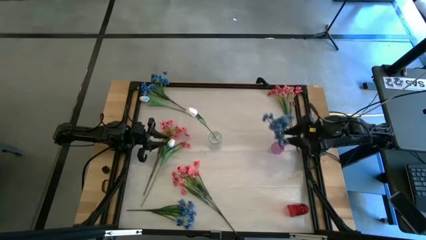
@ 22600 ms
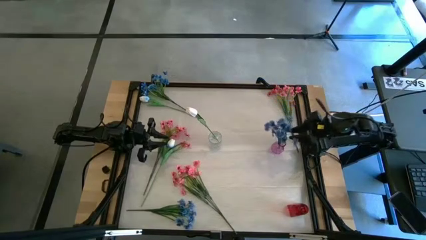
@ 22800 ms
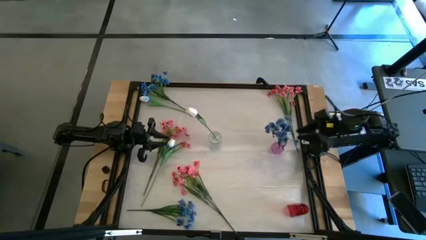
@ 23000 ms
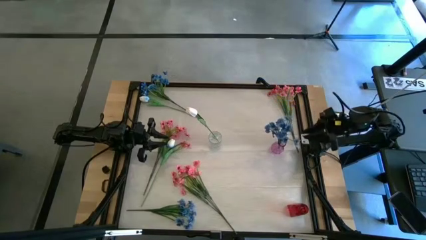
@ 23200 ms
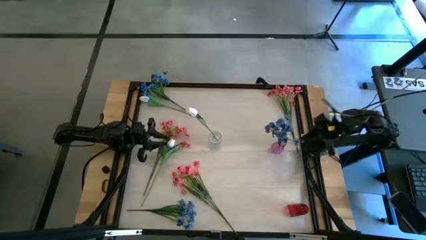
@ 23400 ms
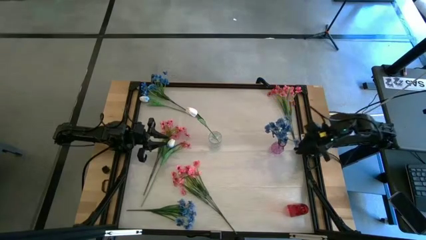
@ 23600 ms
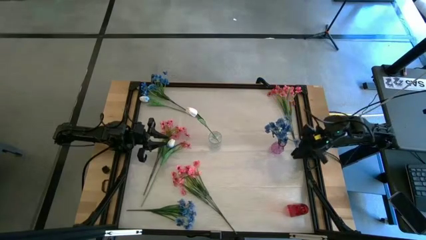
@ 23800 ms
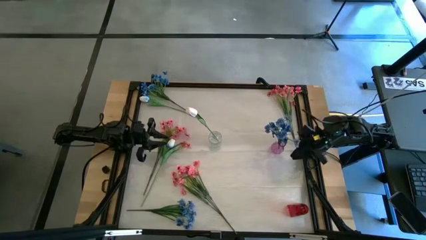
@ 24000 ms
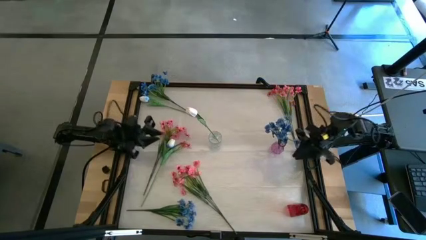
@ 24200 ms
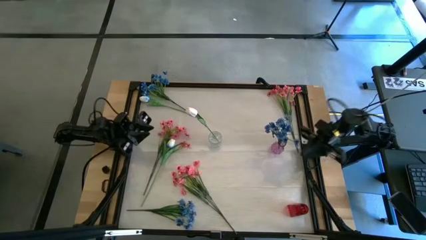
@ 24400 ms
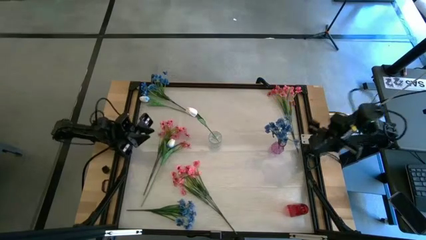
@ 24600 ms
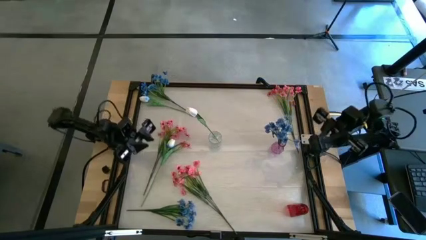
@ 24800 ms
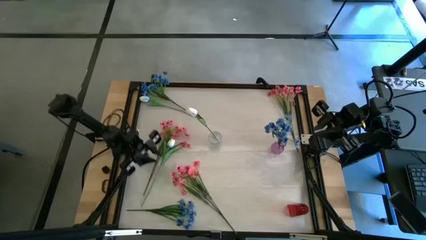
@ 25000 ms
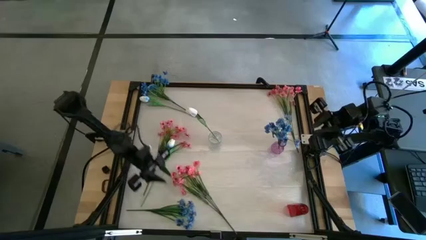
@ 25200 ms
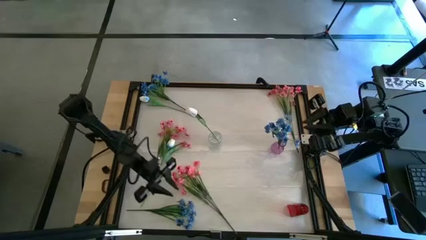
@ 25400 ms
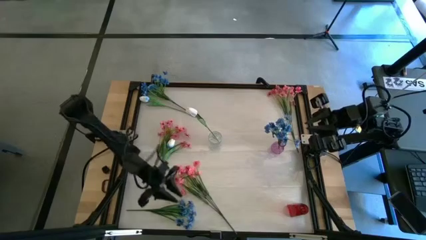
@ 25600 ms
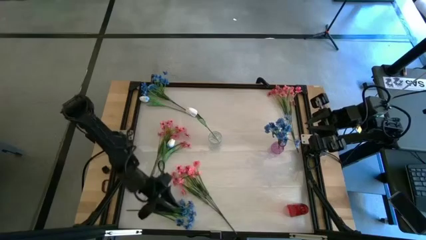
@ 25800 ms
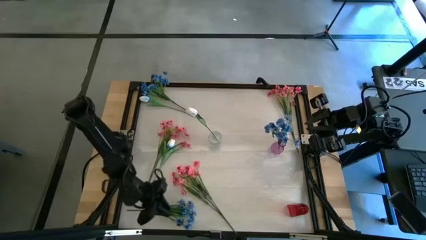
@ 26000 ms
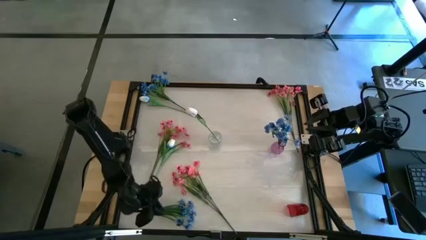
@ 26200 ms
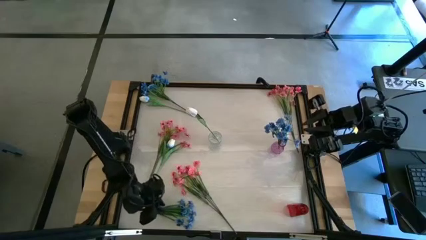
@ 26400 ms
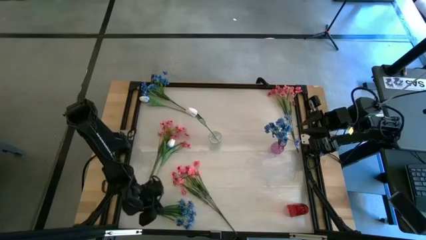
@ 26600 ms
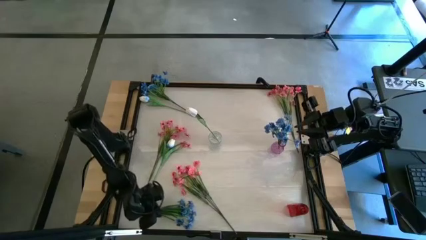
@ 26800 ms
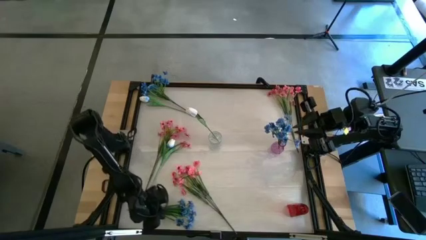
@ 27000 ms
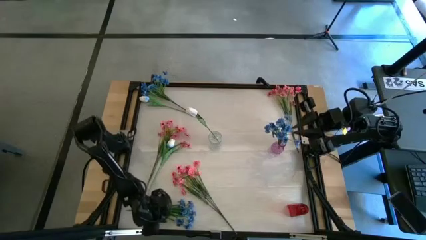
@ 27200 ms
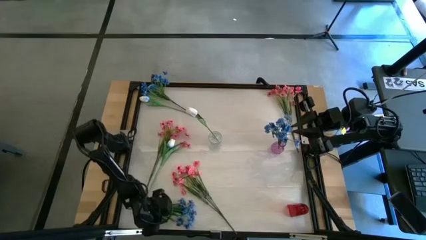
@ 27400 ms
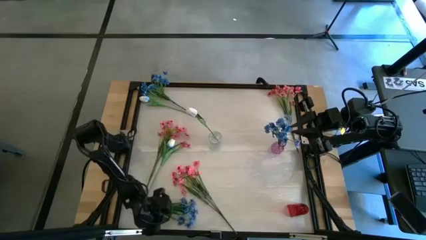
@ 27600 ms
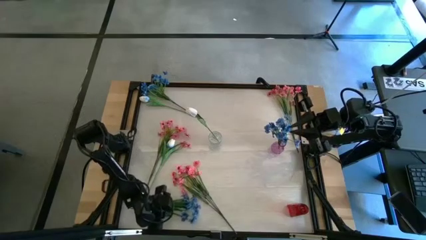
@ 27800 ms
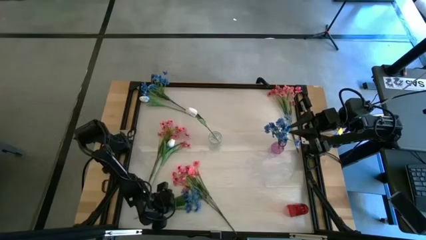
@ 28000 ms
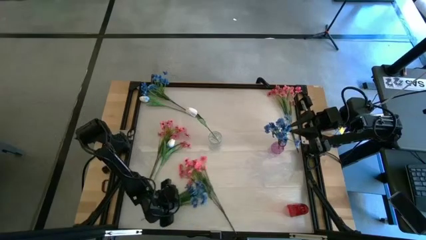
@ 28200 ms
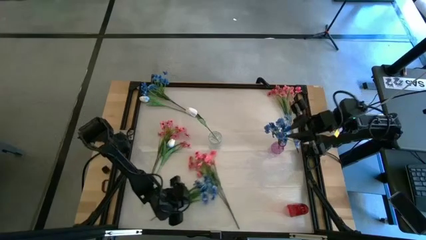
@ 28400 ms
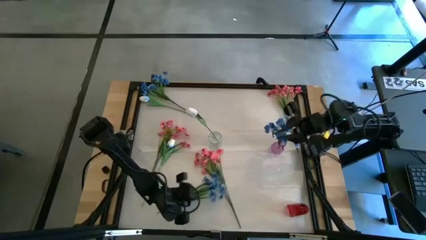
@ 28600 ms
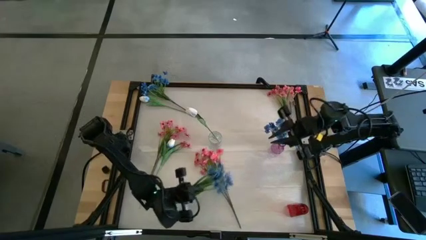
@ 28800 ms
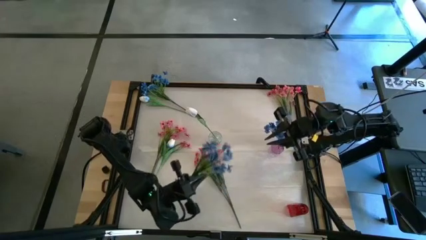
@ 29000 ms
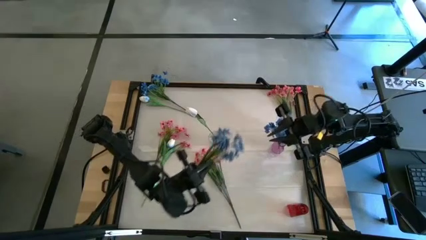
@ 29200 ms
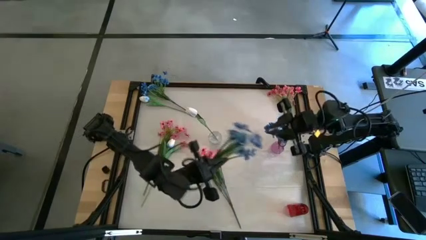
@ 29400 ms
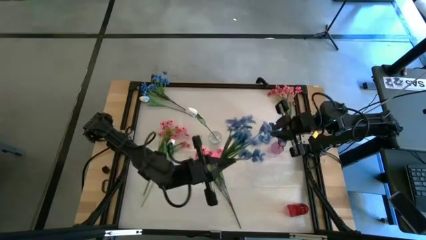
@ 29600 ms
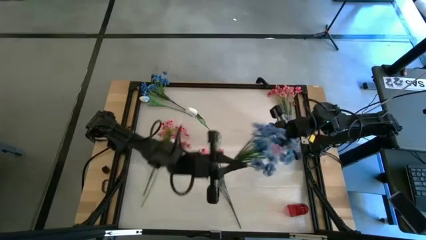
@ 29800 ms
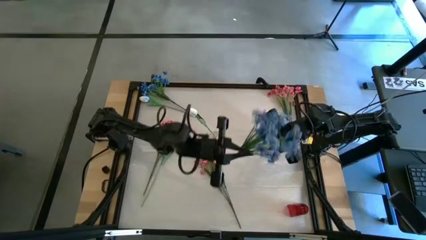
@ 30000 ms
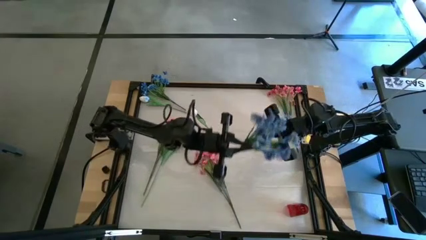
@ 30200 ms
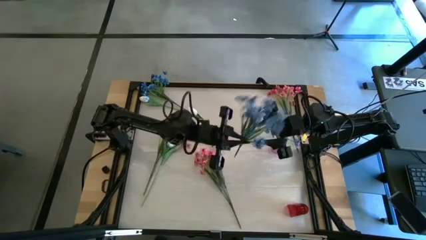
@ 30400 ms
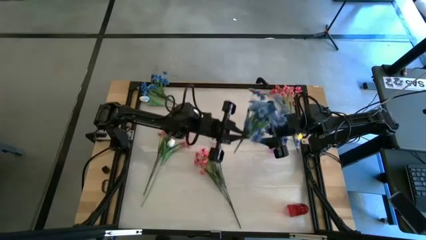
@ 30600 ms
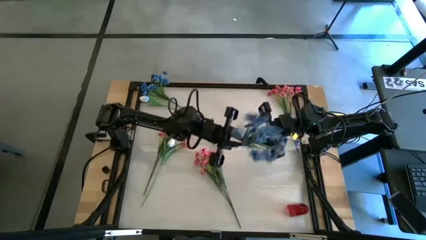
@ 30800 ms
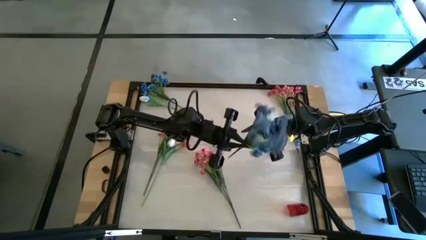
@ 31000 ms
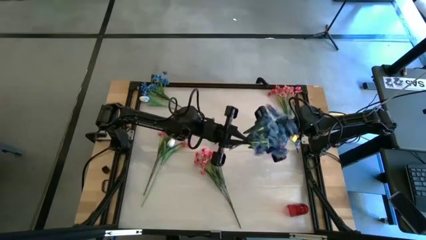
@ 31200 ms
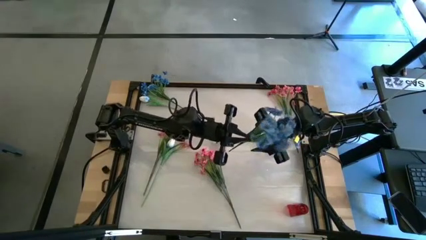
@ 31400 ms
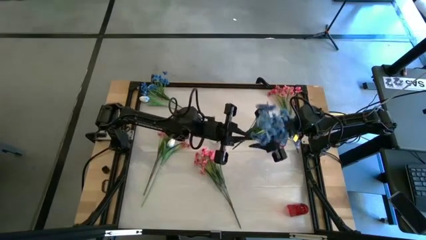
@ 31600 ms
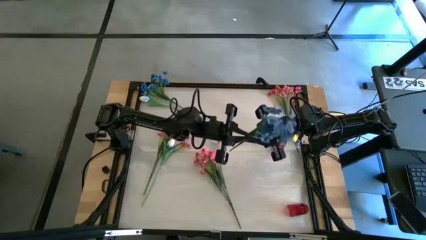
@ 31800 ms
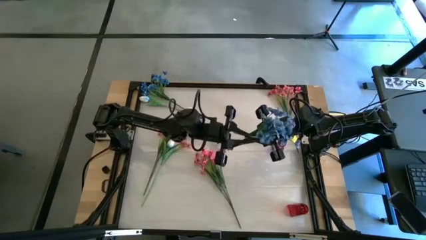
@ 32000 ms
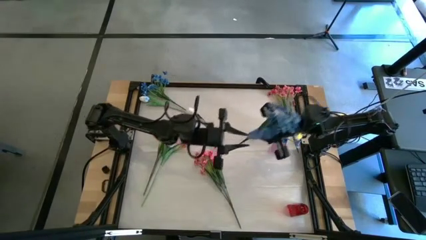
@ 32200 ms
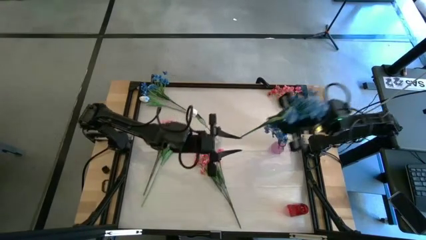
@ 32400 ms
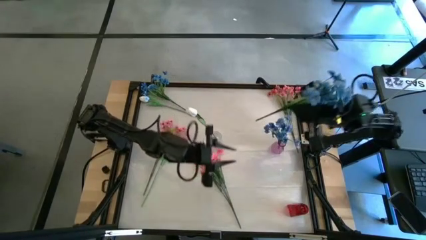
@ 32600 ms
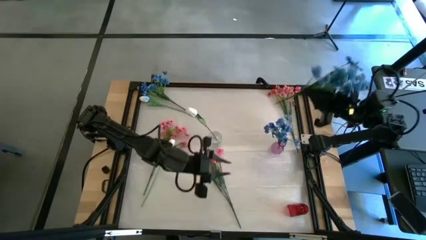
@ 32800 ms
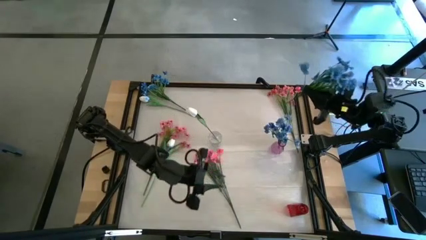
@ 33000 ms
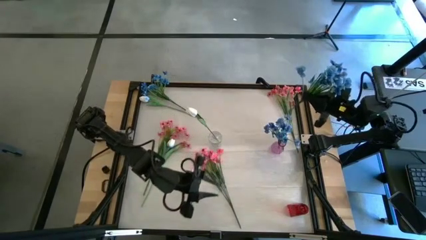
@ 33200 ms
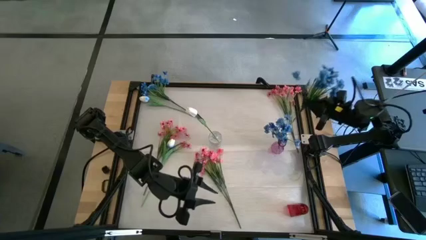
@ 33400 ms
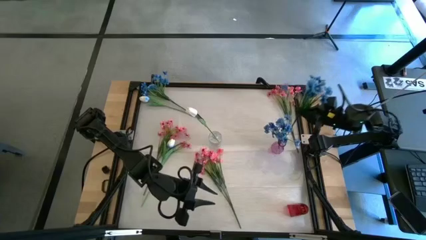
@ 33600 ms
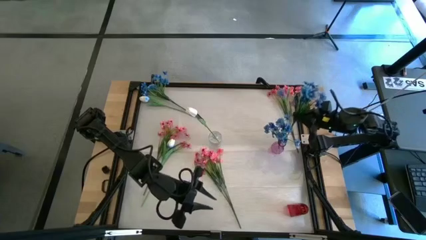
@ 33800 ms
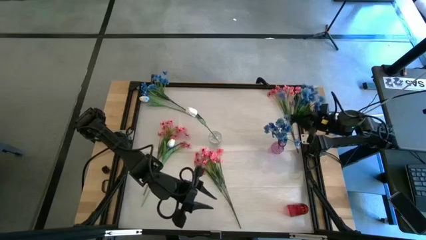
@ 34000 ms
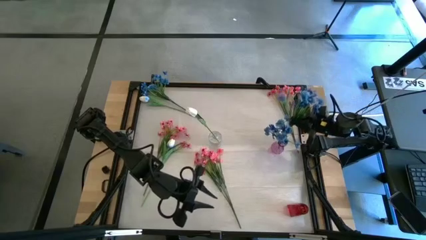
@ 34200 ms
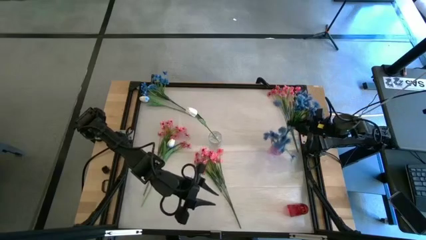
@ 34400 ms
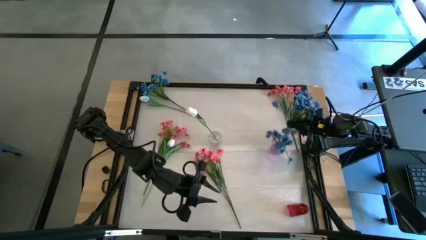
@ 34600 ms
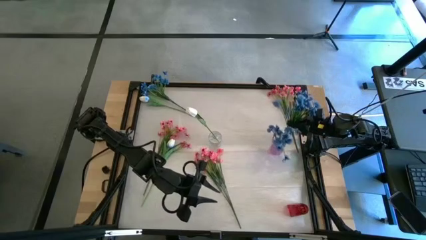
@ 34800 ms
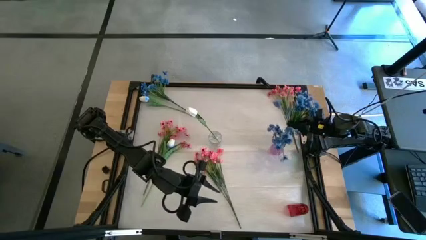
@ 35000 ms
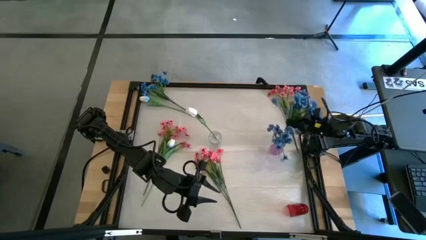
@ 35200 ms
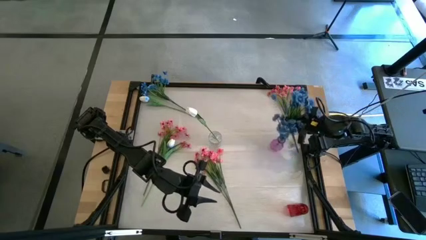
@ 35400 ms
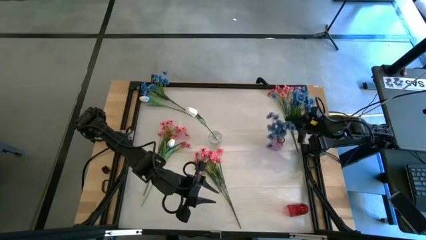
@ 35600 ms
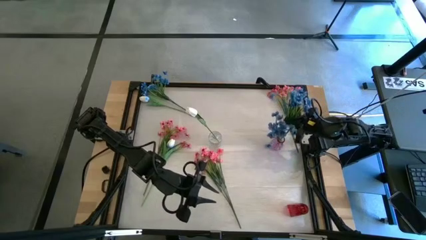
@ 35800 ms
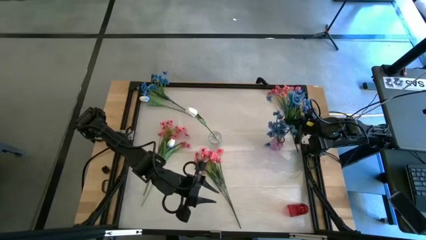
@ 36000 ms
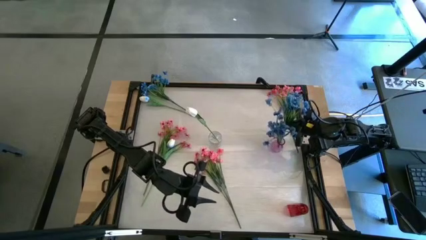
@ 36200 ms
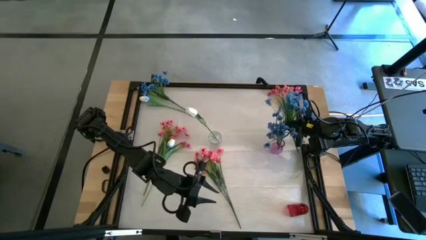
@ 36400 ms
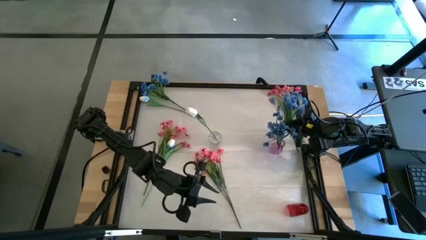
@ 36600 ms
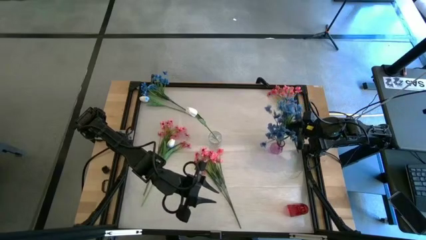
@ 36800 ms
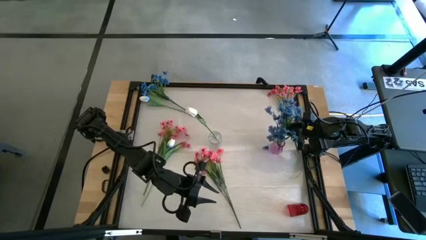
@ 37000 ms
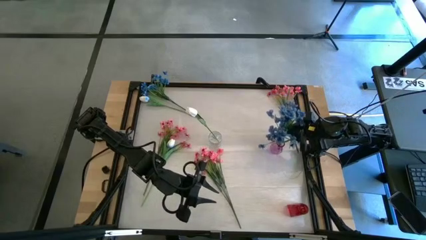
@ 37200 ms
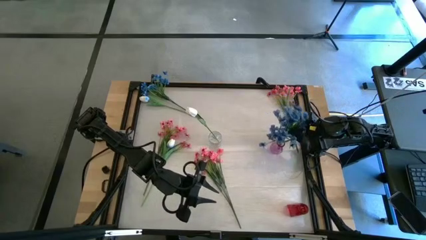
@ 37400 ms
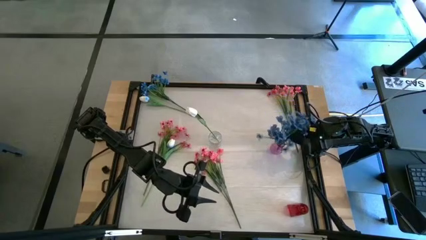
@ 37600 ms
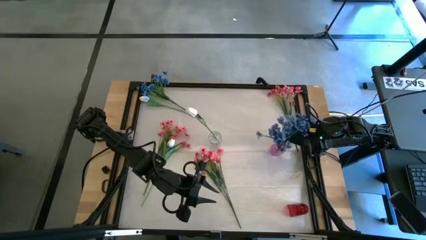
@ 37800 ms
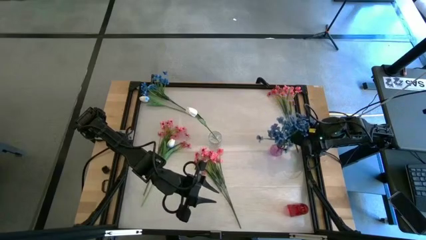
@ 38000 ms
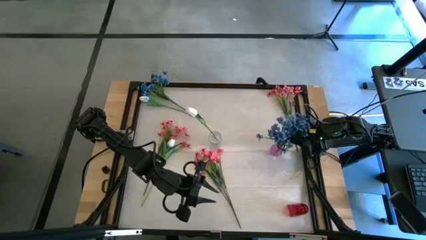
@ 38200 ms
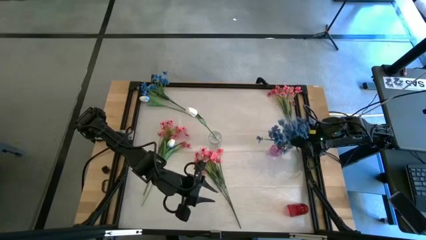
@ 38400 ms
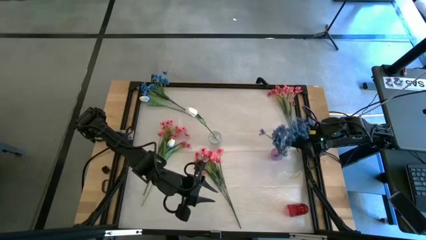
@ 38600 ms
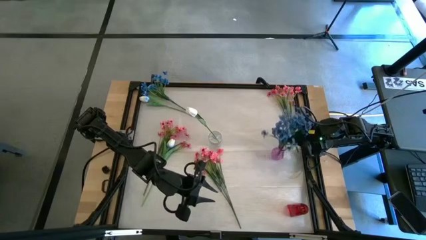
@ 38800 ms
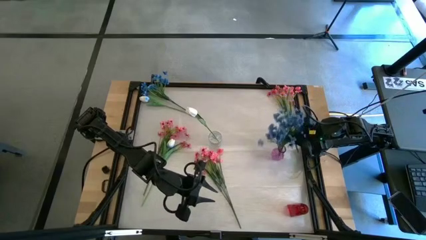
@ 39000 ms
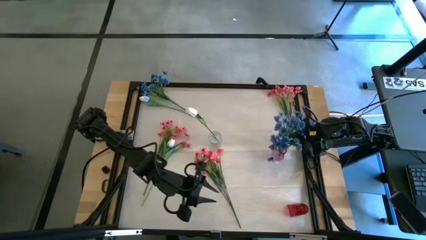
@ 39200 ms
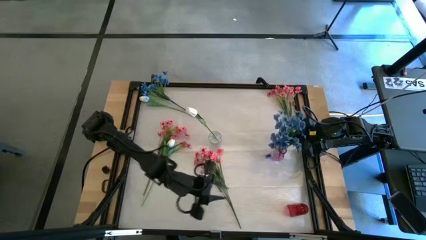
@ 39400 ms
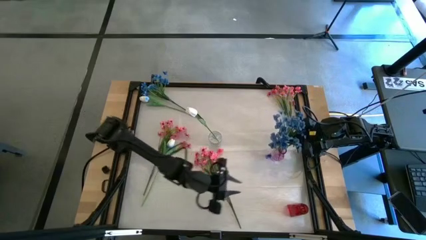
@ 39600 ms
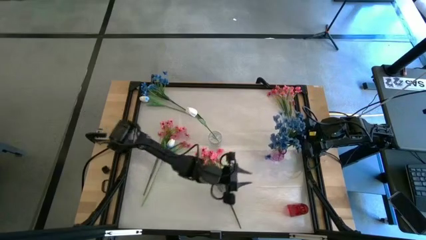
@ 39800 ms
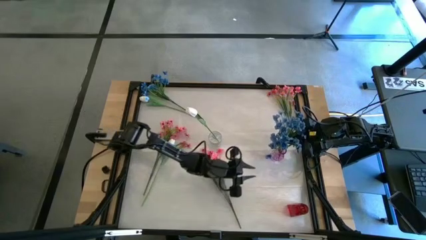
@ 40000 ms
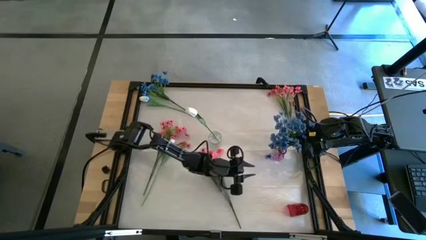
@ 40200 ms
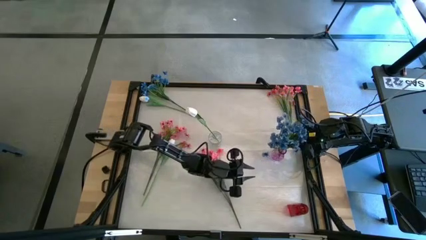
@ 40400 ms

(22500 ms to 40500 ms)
Task: Sort flowers into vase by color
Put the bottom blue flower into the purple vase
